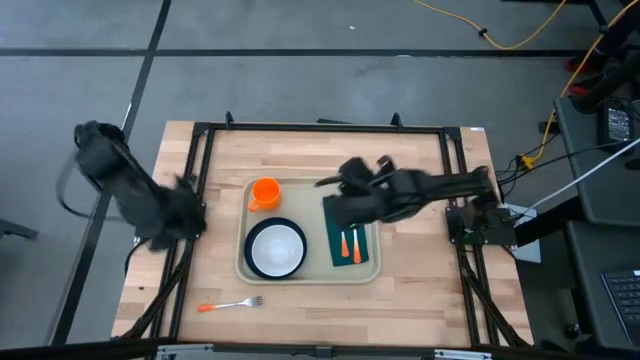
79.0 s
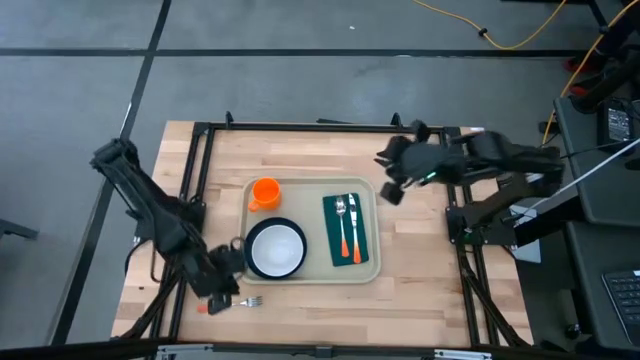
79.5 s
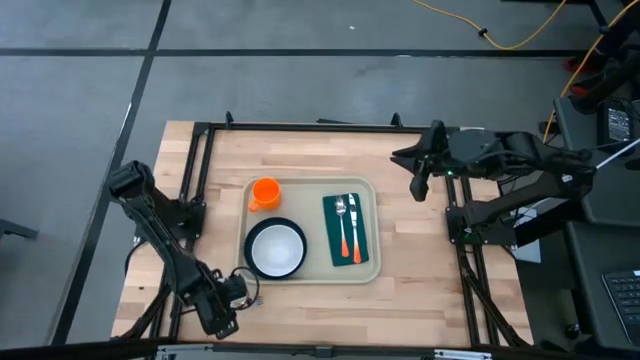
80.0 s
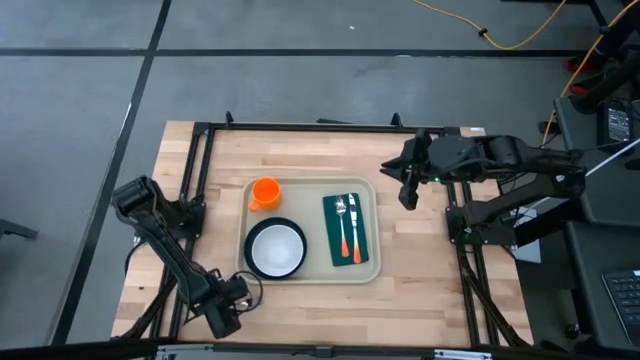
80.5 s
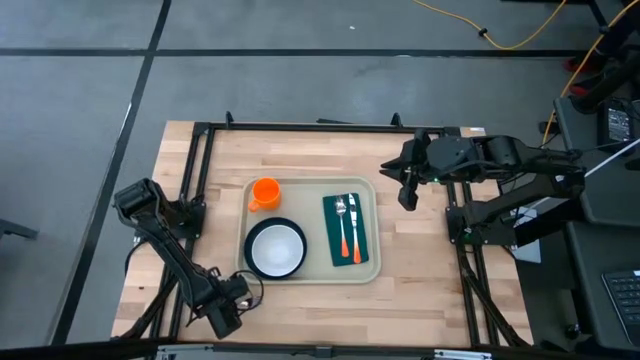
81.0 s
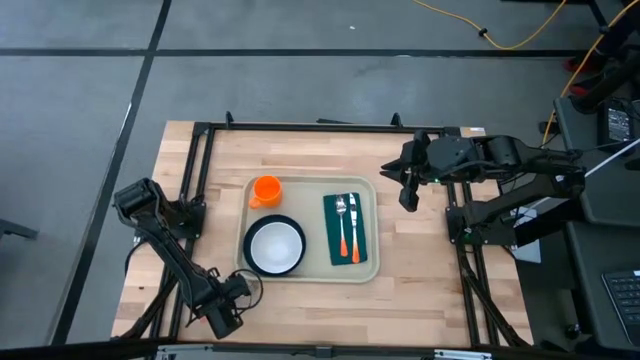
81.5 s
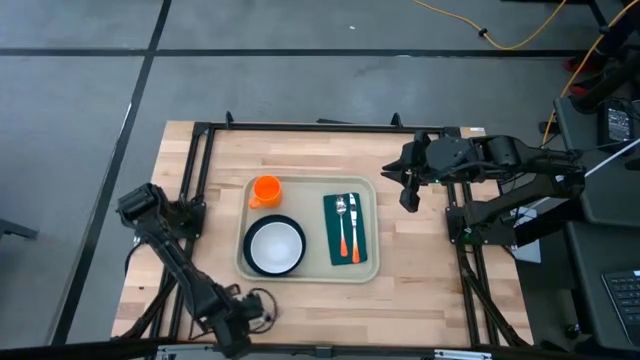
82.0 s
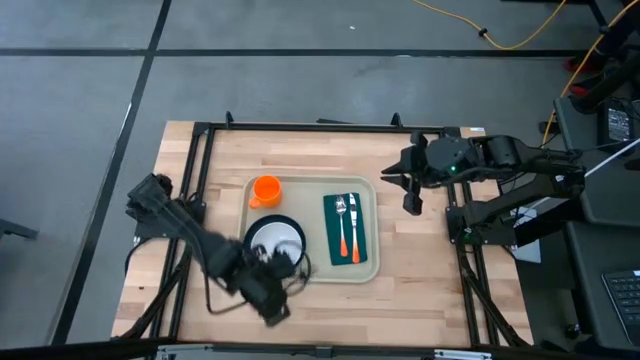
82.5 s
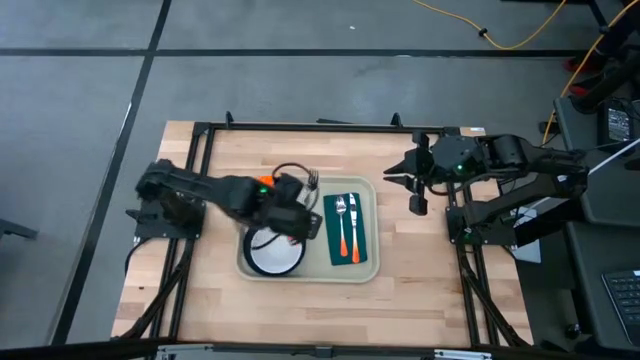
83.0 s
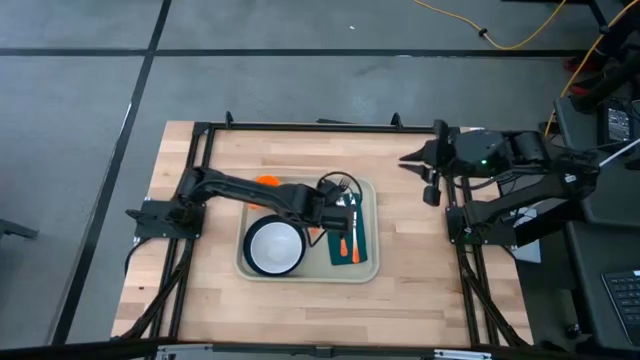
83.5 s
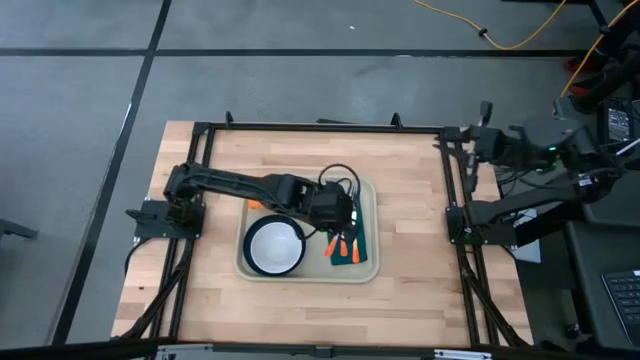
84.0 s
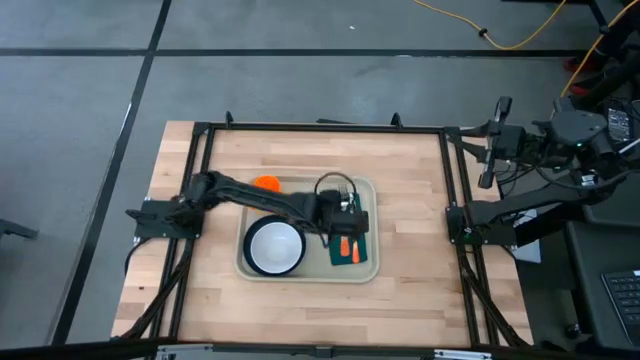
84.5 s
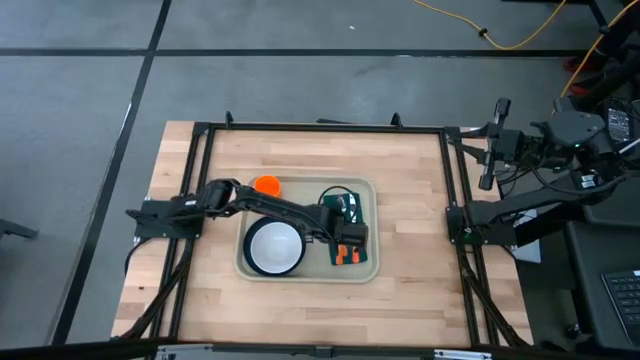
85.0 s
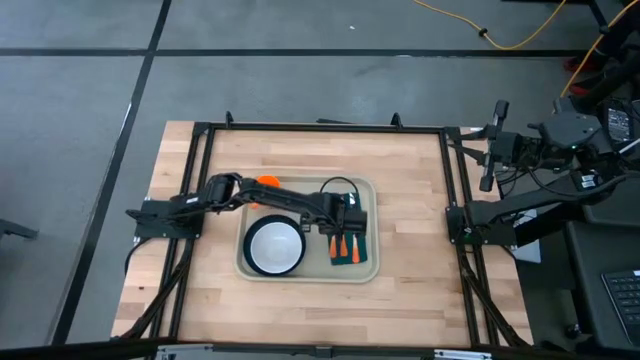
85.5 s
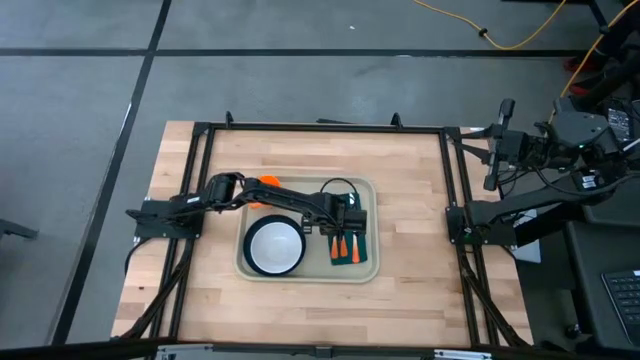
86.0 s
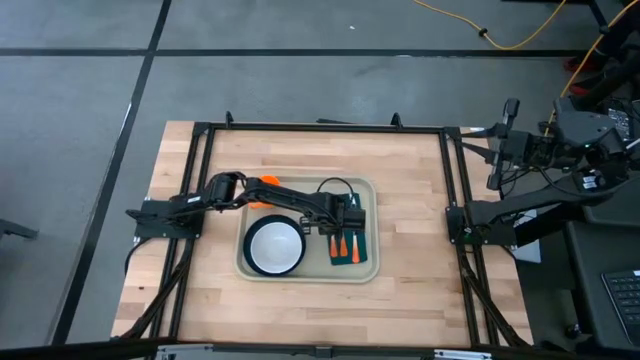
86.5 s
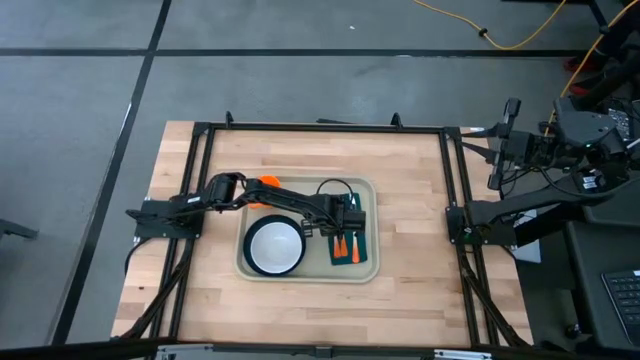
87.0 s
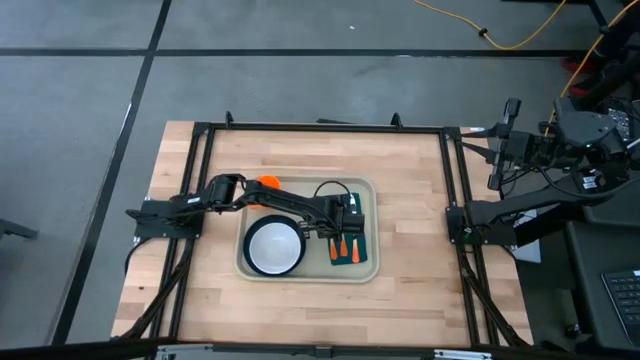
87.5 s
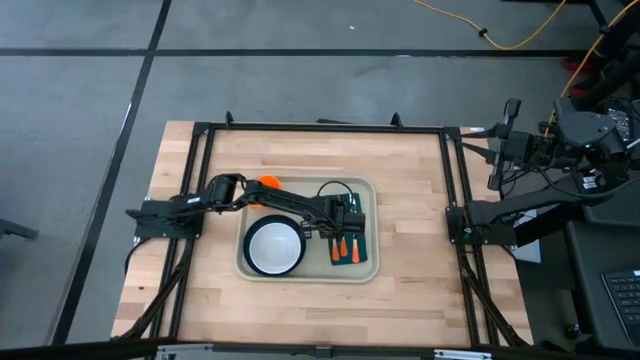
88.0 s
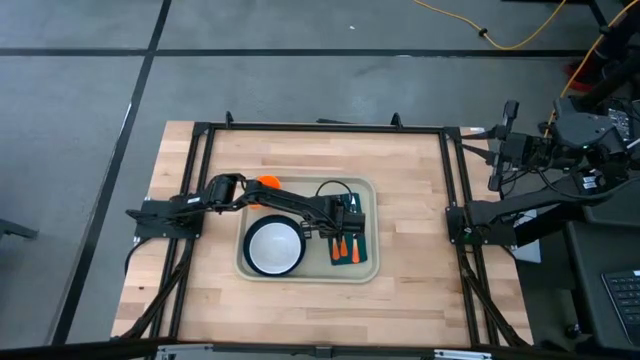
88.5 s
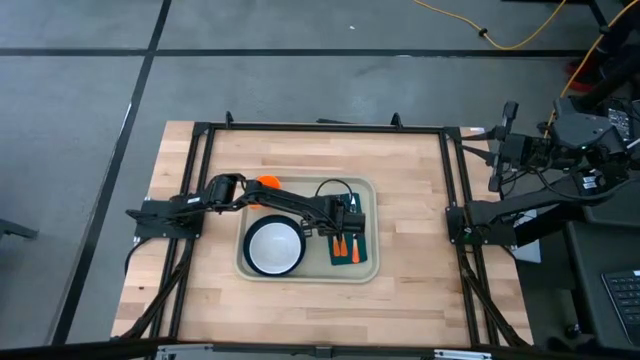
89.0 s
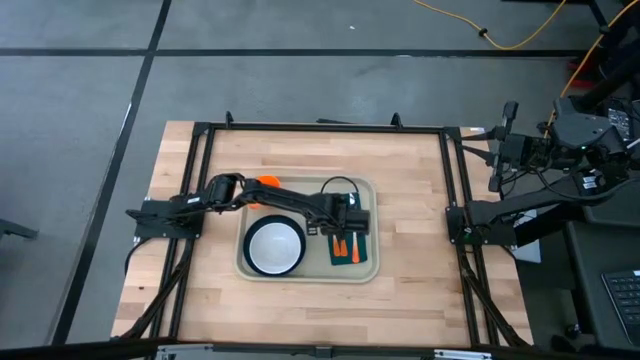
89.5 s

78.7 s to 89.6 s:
Task: Set up tray
Put the orange fork on the dark green napkin

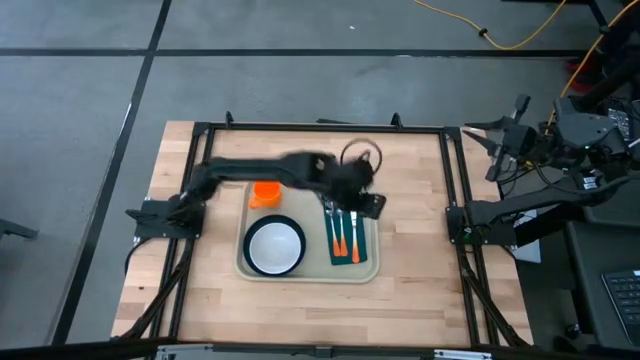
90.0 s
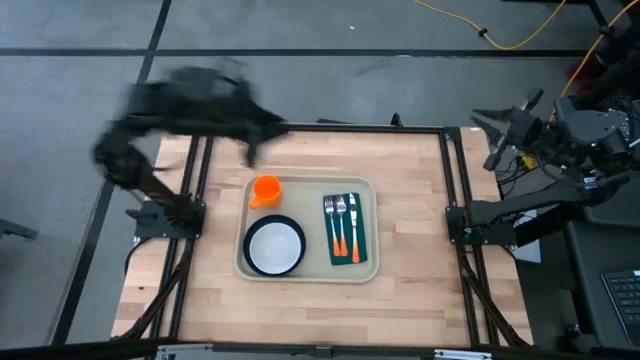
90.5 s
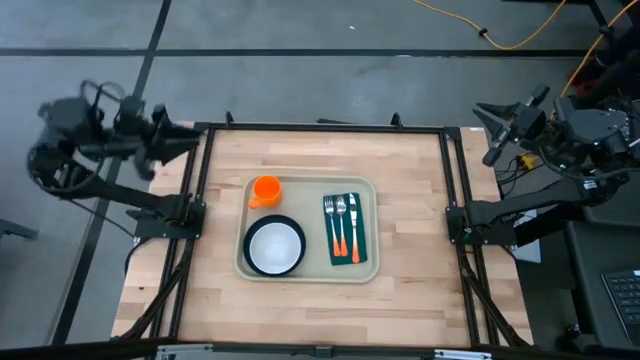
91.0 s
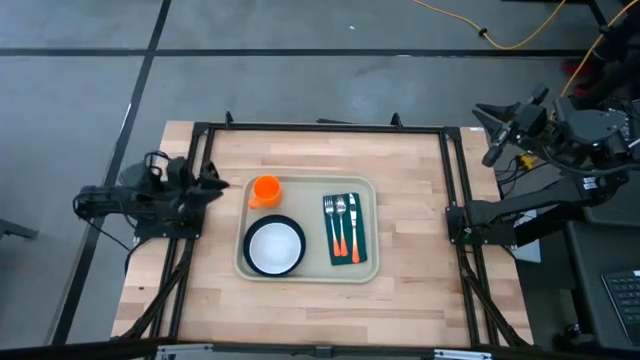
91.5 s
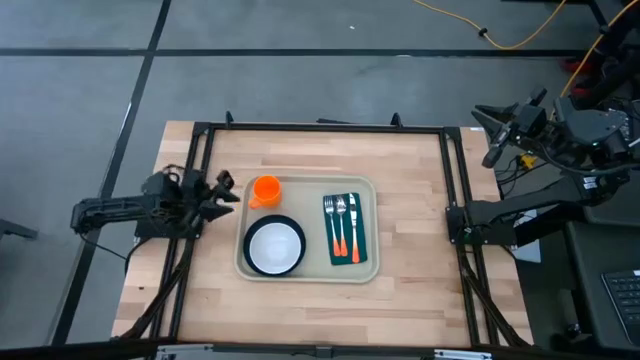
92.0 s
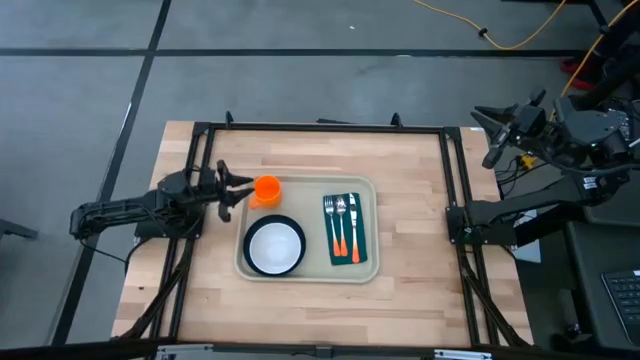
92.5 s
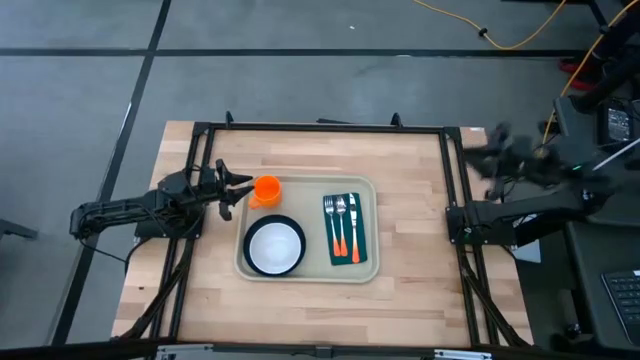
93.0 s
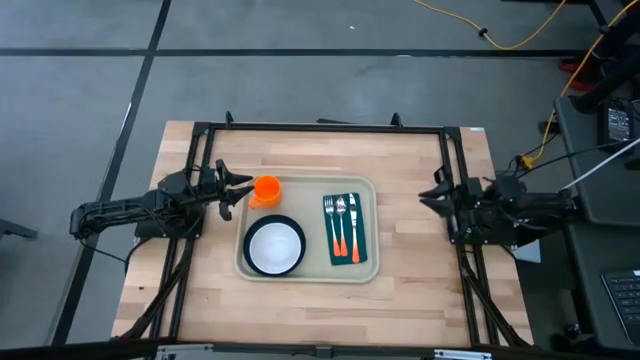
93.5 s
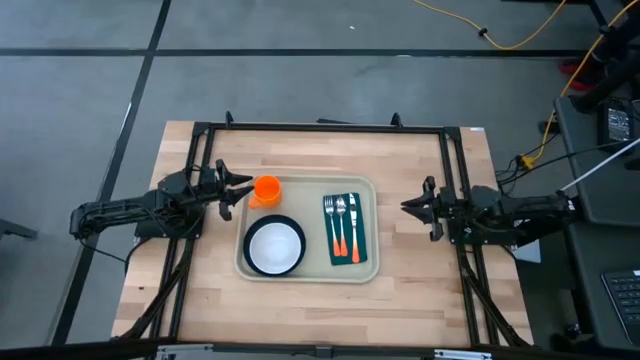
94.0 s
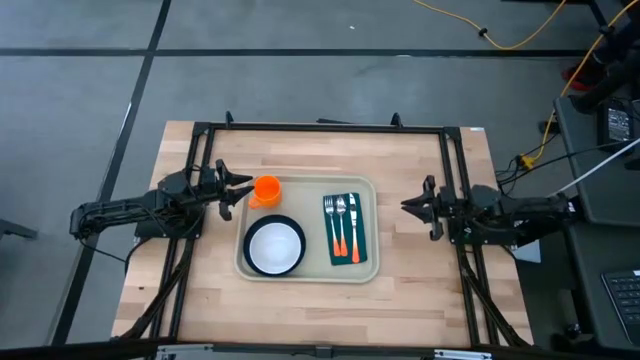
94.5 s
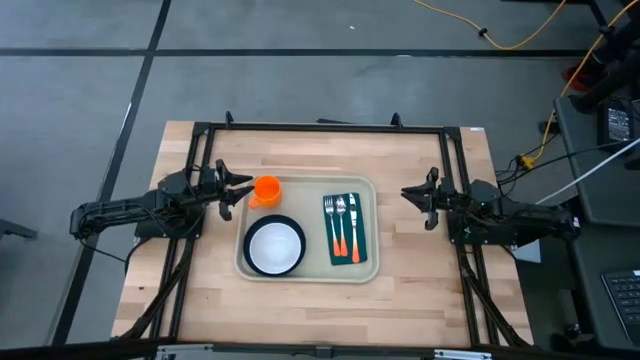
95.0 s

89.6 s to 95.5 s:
Return to Home Position

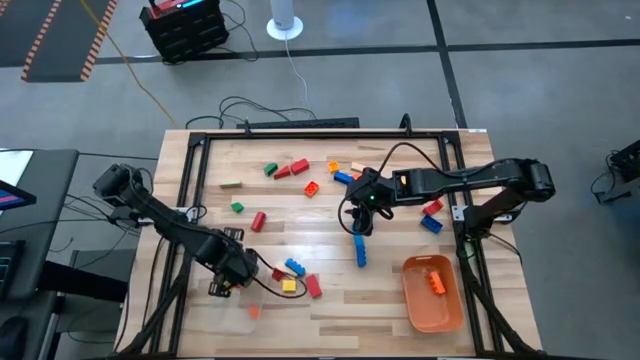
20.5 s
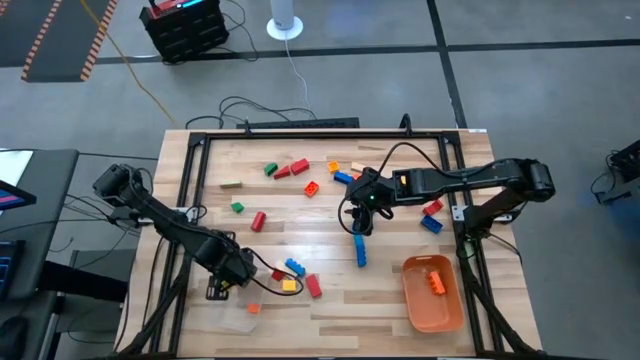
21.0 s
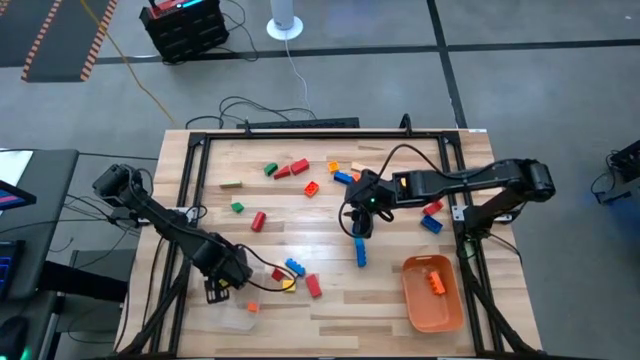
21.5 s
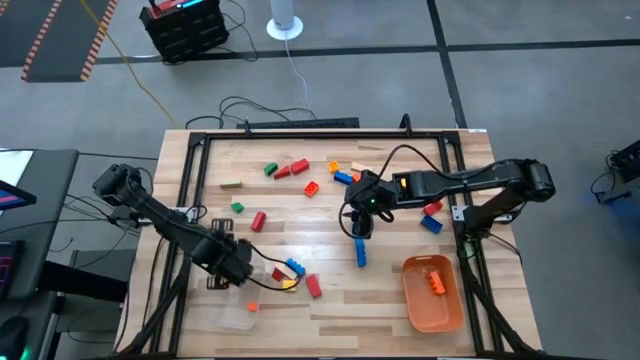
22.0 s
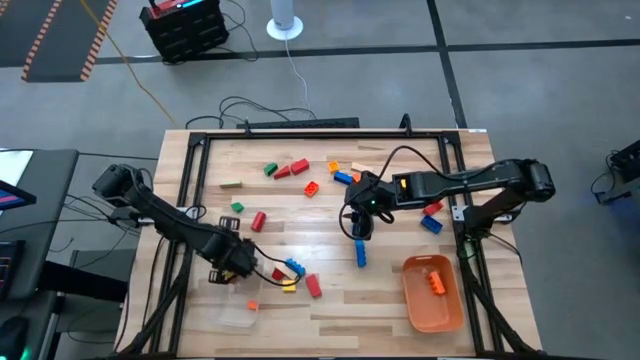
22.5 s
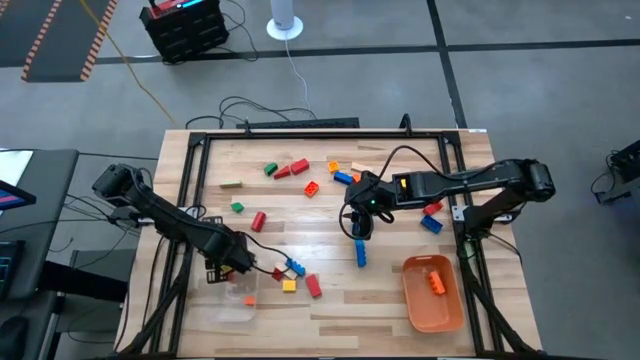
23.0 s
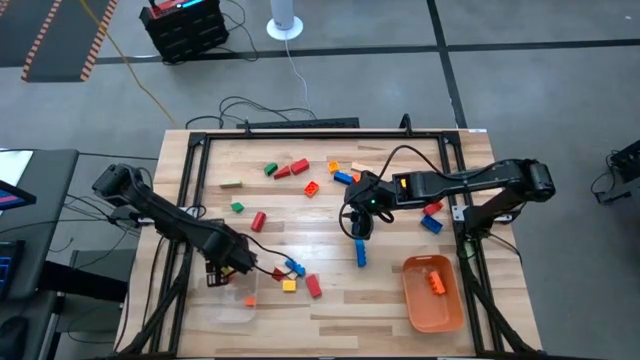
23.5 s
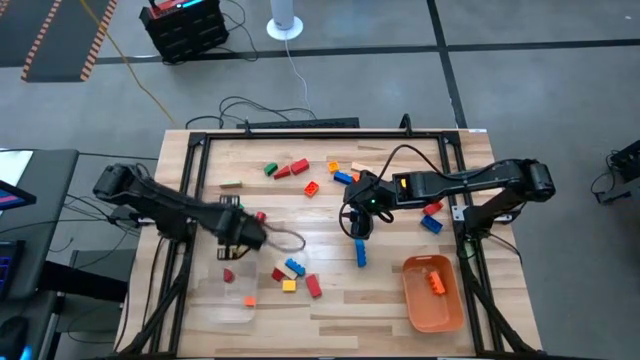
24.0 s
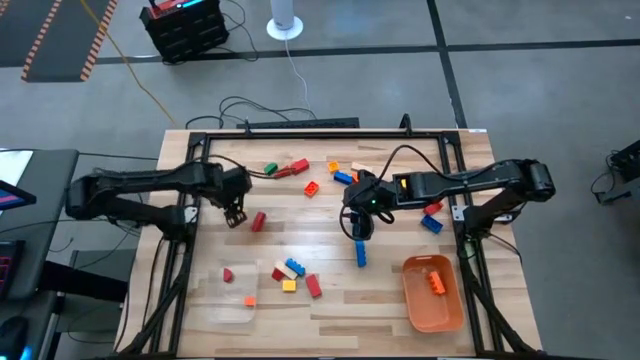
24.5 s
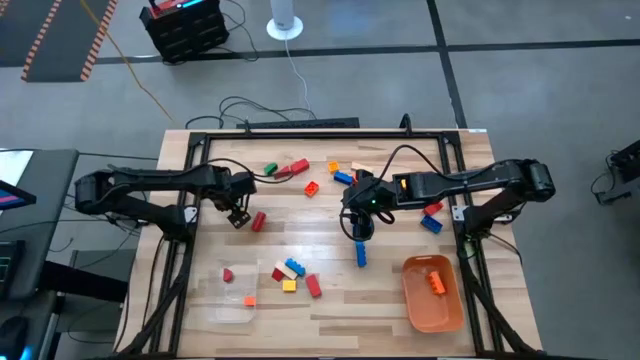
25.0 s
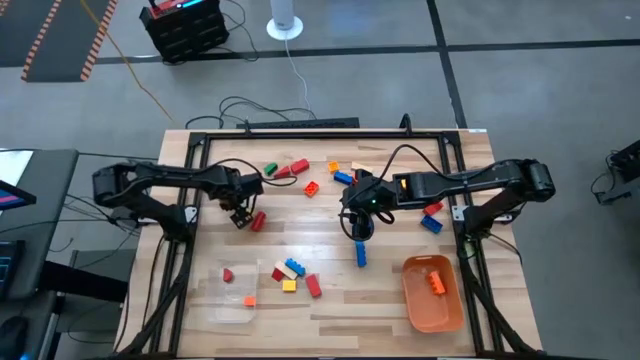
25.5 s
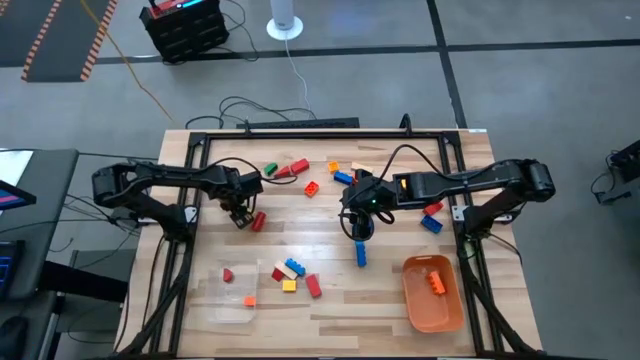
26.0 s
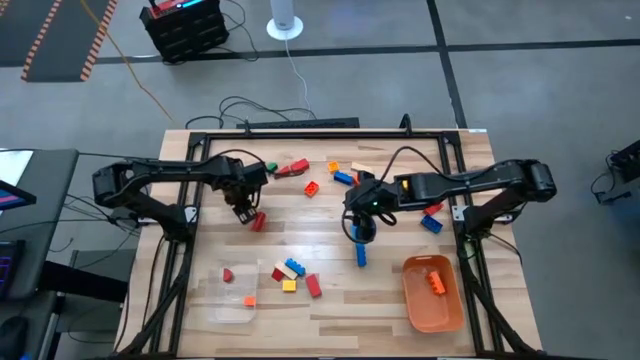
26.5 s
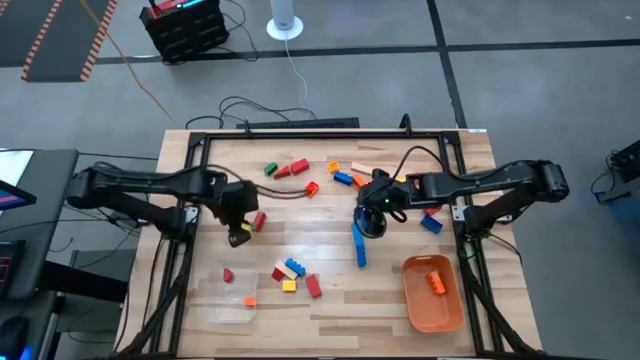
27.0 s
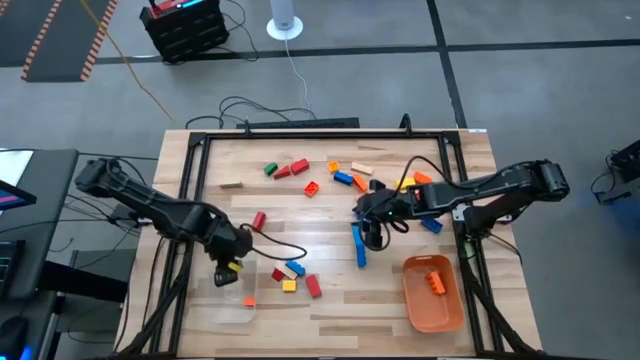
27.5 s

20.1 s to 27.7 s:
Task: Sort blocks by size
Put the small green block into the transparent bin
